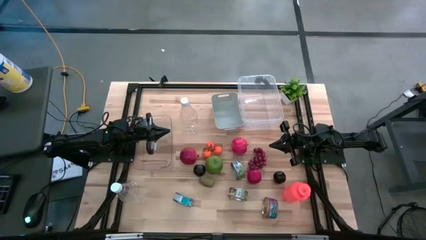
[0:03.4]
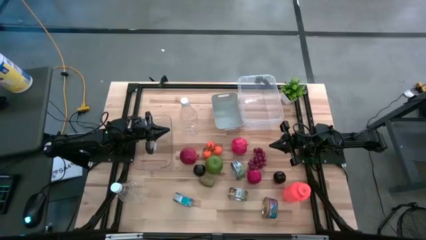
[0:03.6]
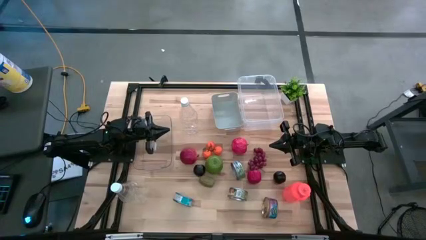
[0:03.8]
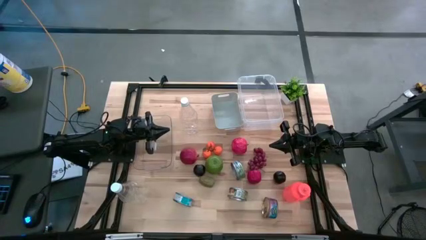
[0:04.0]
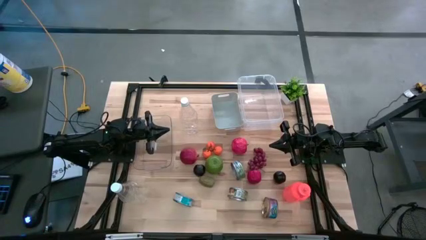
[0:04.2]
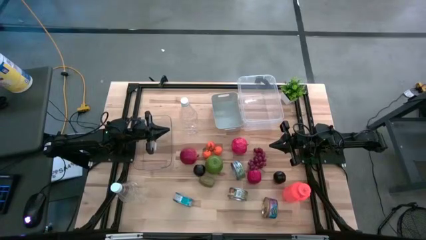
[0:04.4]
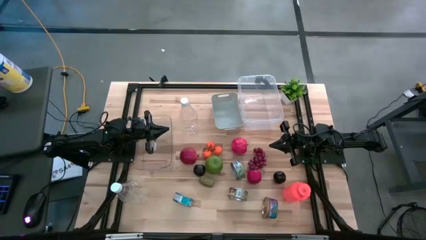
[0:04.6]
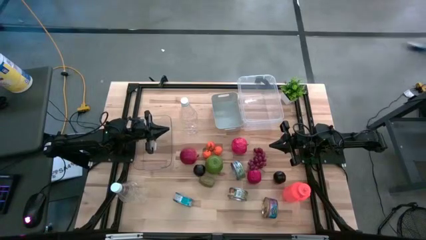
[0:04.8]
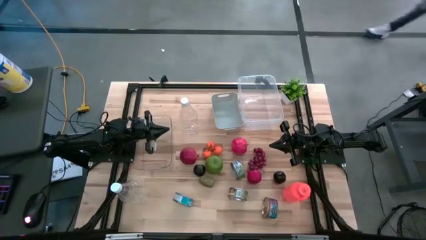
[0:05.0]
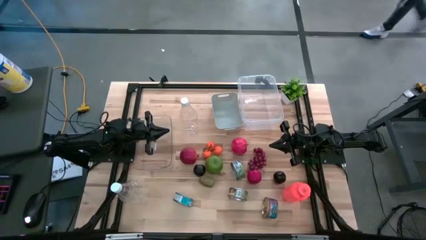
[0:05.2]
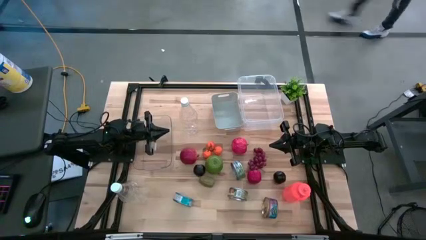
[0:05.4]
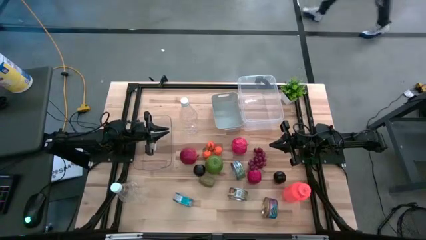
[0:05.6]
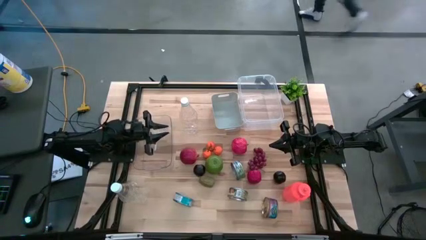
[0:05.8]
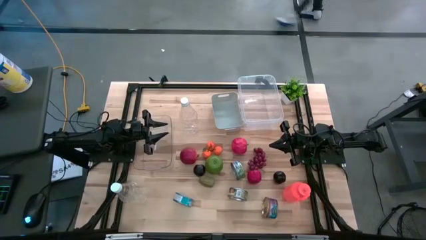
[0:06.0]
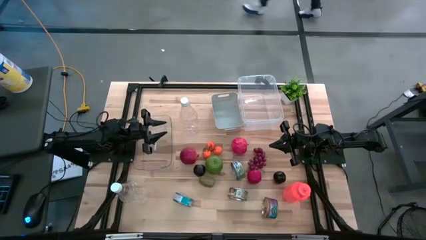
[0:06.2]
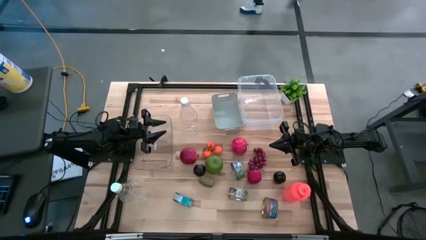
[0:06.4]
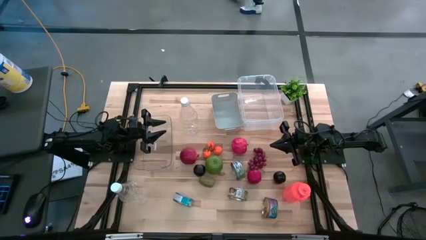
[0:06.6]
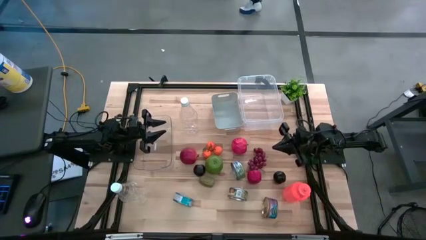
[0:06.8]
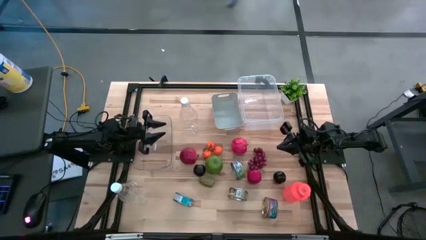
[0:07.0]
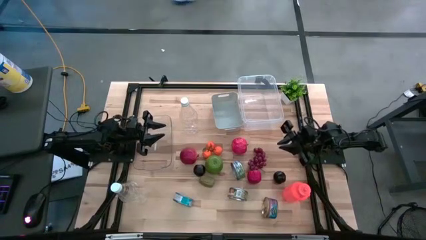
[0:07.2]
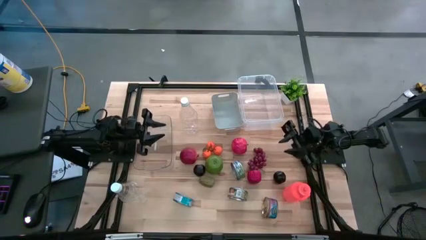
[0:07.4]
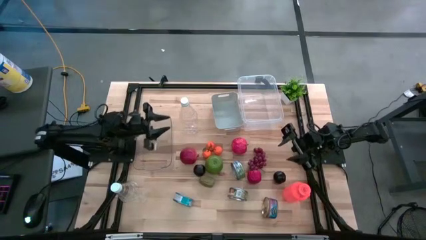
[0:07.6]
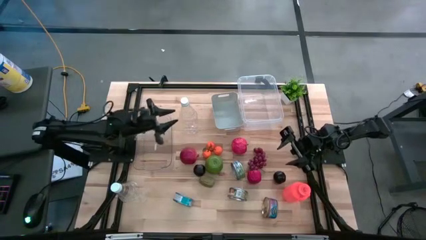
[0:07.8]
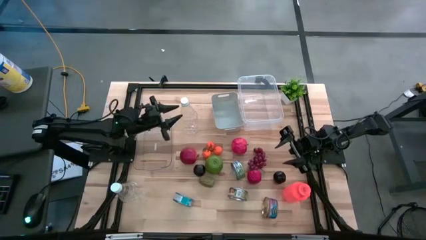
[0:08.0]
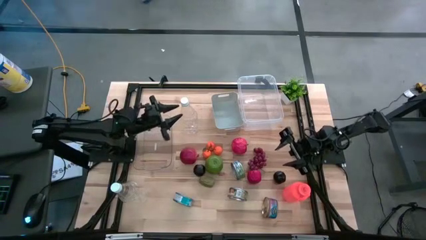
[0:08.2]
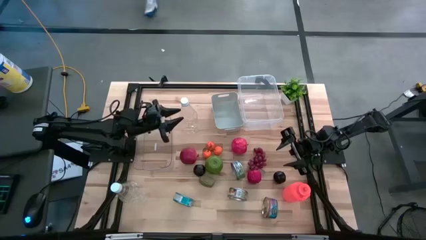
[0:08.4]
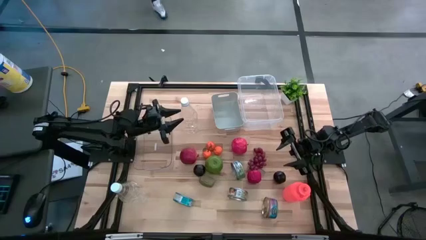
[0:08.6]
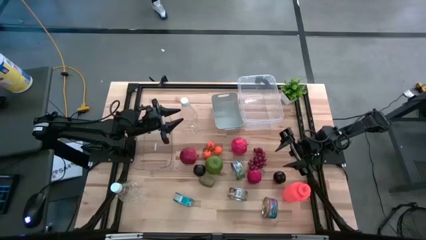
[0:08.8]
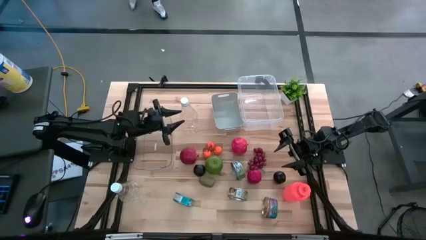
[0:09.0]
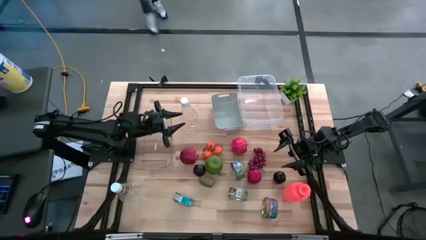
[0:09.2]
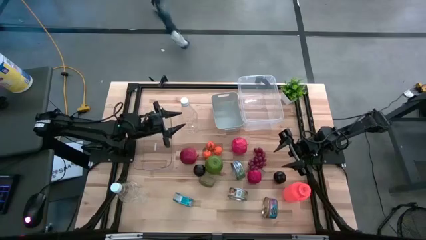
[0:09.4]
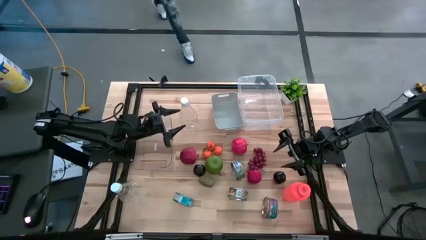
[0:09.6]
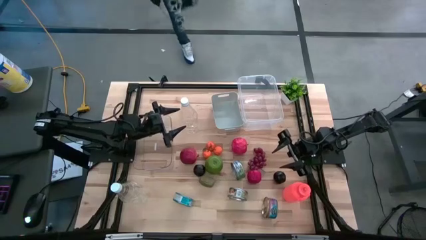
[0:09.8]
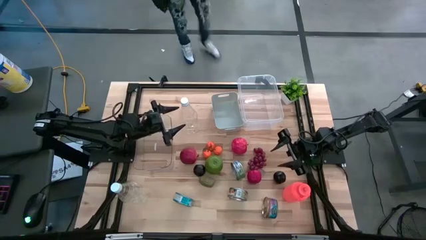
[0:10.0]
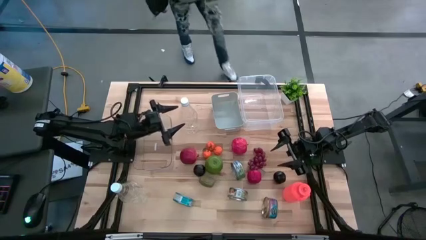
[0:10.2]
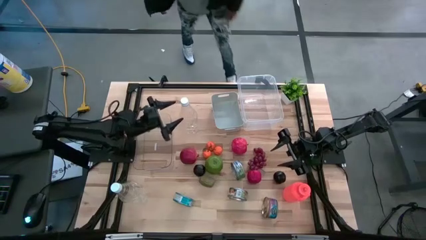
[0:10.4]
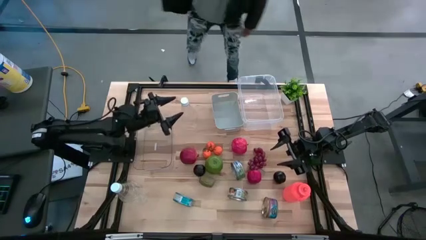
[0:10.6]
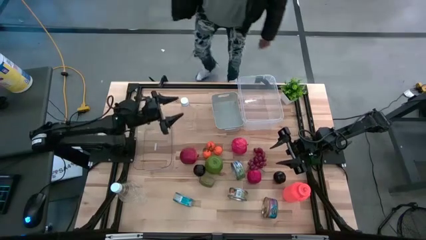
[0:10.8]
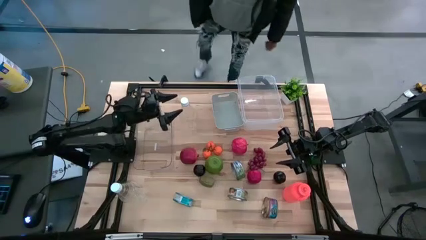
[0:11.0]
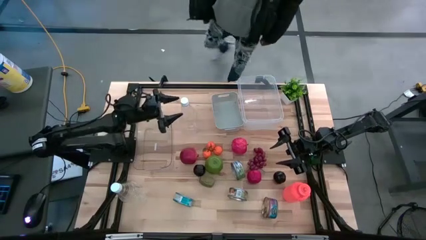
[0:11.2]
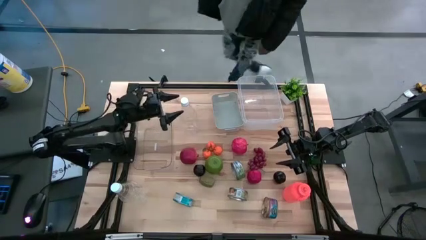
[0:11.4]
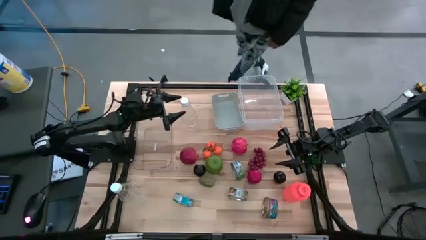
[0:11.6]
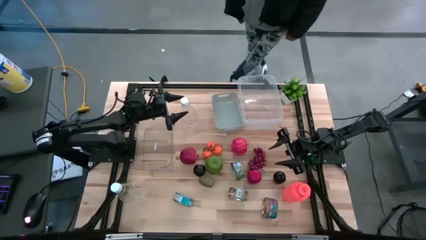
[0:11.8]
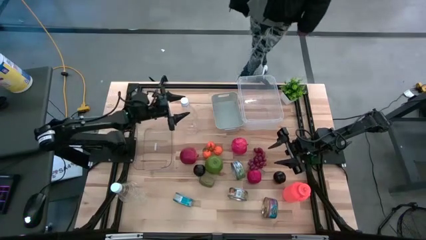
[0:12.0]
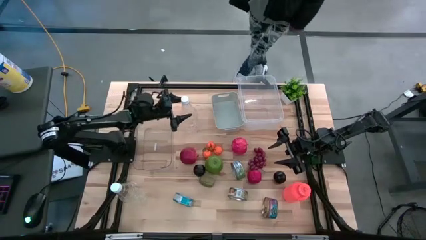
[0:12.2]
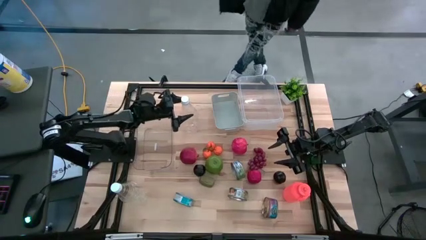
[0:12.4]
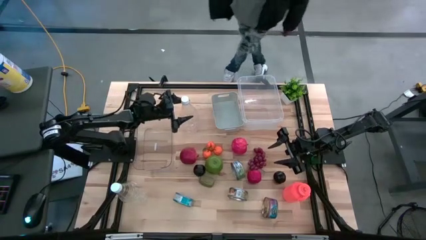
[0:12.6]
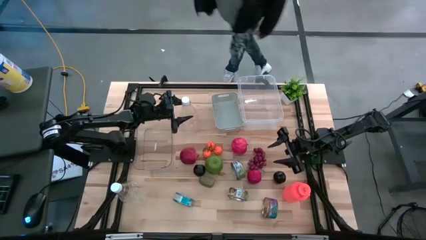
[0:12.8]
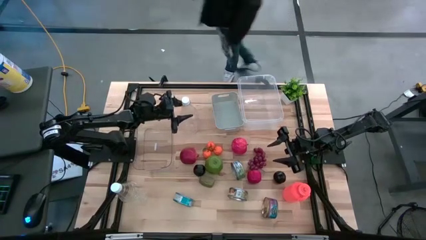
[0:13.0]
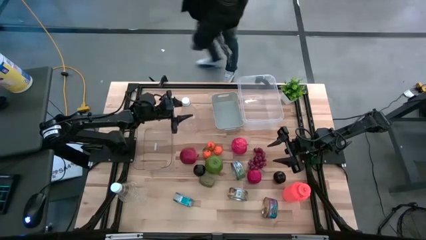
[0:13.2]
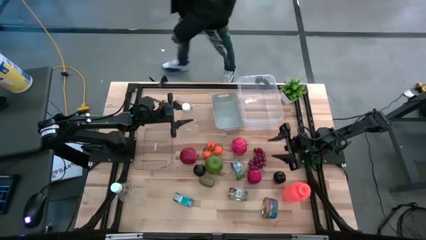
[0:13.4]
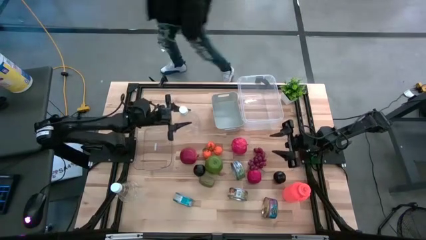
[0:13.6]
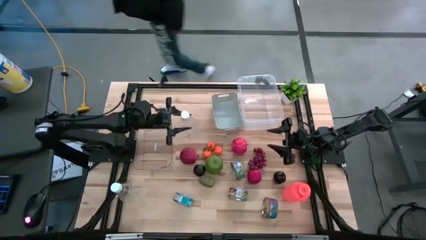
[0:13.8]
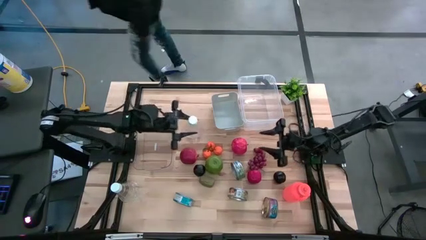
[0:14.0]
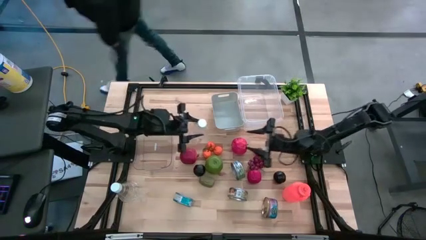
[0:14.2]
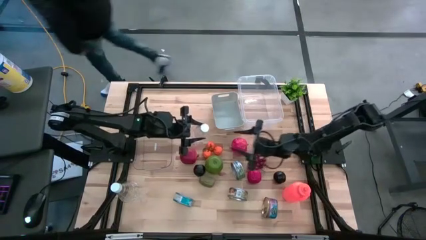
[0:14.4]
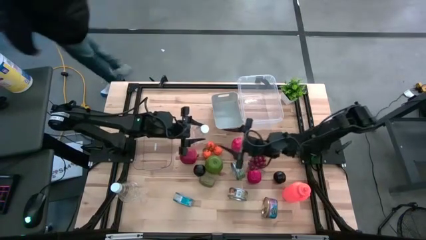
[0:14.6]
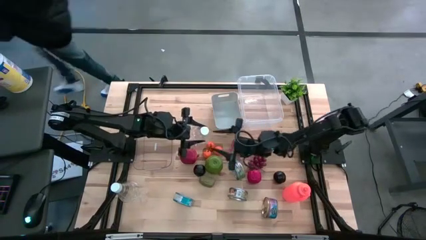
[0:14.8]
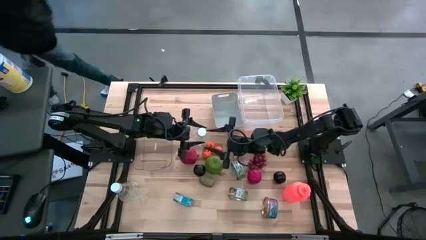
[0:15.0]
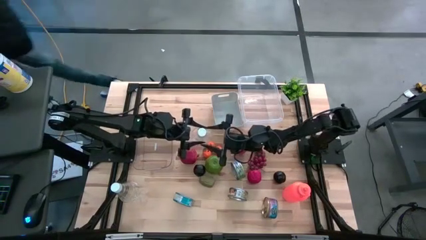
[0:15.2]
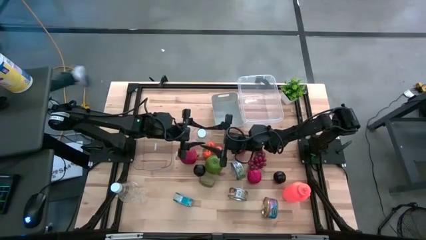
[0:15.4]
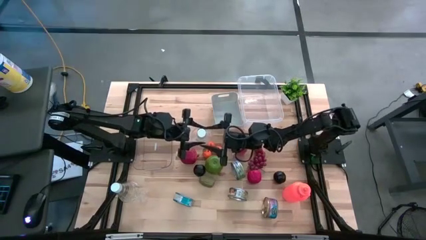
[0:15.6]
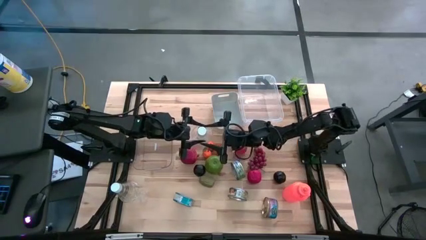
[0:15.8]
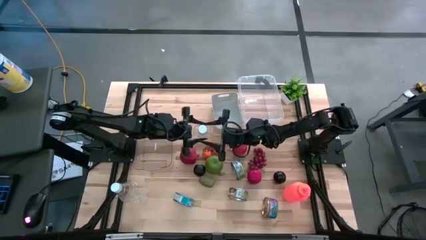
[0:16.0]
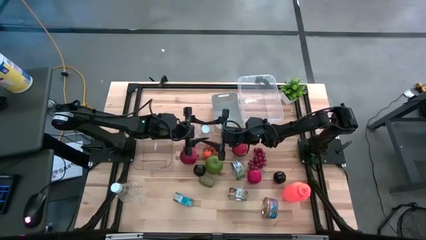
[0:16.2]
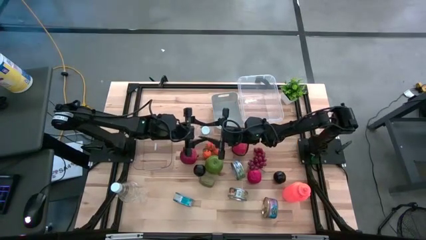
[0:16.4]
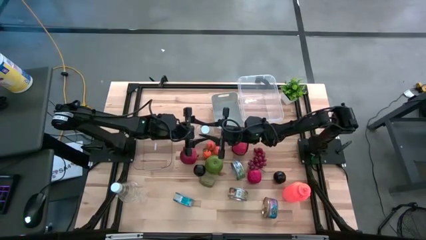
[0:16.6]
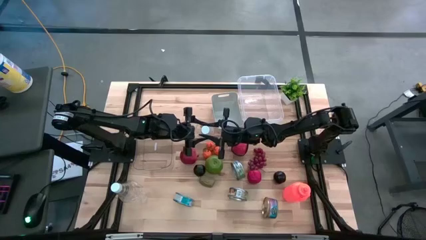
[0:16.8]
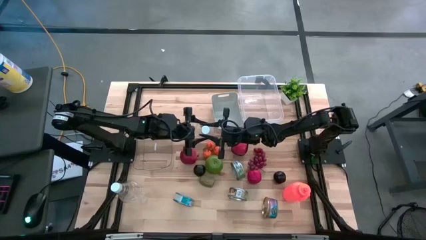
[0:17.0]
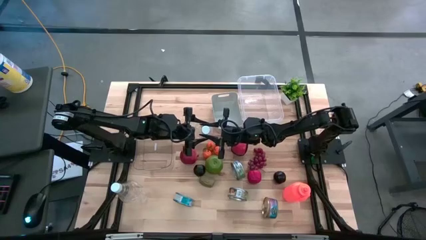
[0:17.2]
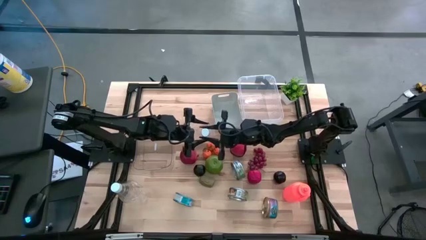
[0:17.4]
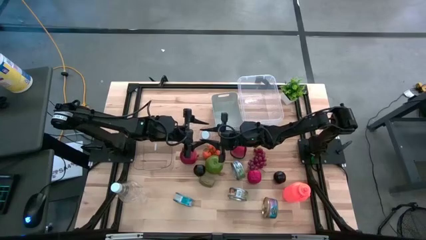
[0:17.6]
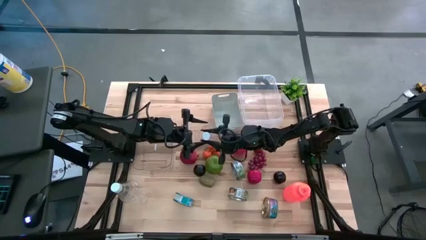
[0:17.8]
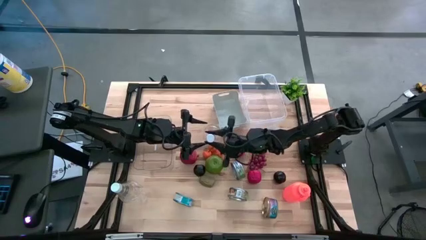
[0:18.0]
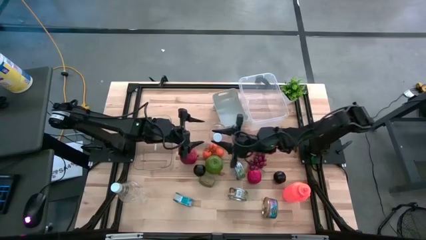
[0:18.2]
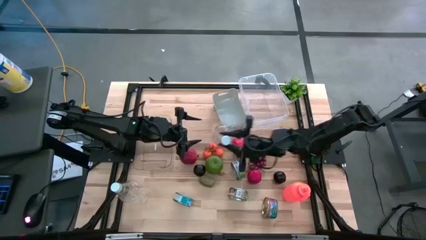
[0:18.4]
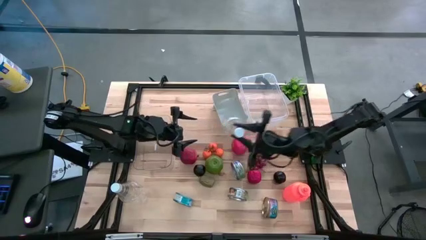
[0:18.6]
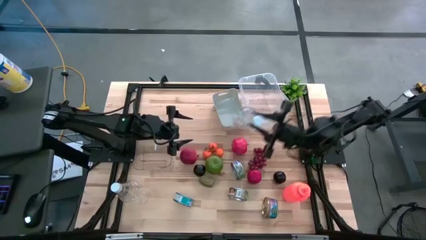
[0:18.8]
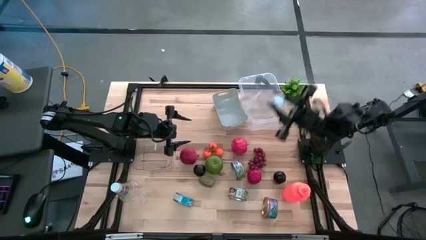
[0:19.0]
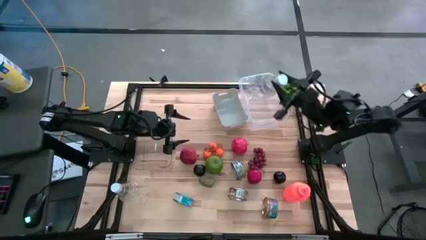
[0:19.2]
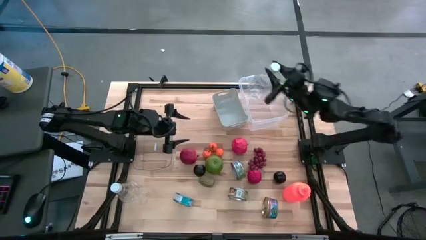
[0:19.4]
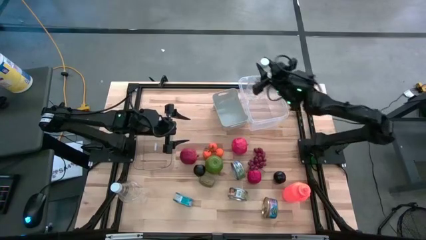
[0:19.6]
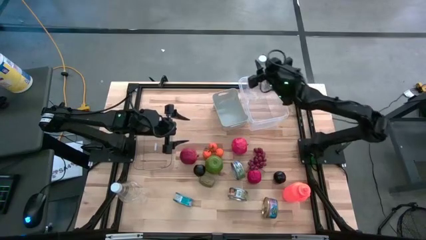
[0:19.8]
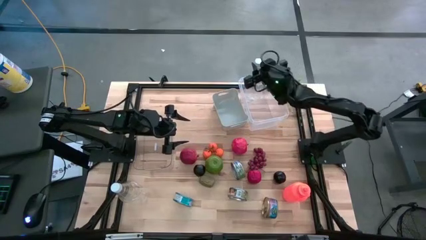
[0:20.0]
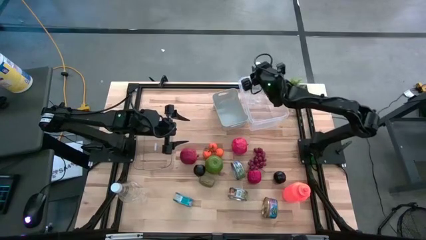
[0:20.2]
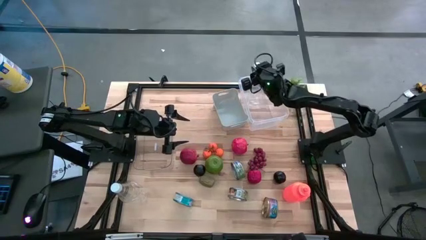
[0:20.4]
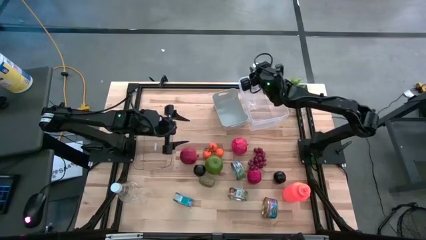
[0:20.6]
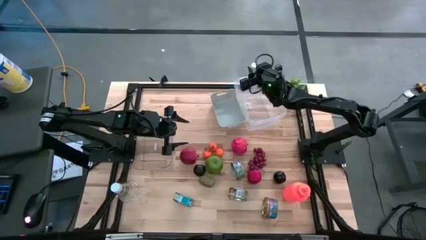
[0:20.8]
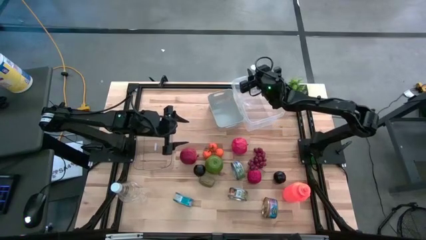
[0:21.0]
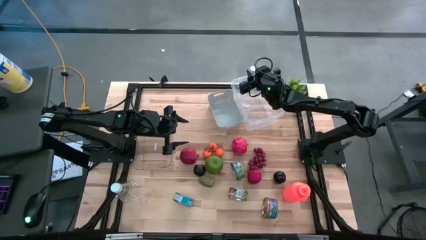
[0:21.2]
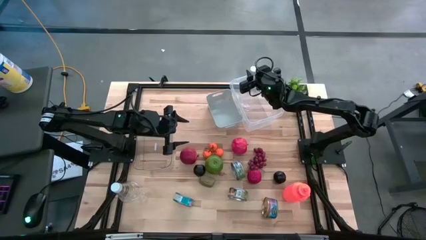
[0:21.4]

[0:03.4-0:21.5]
Task: Pick & Place Food Item
Put the top transparent bottle into the right transparent bin
